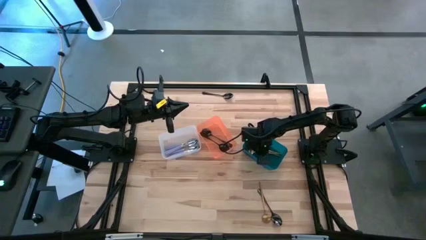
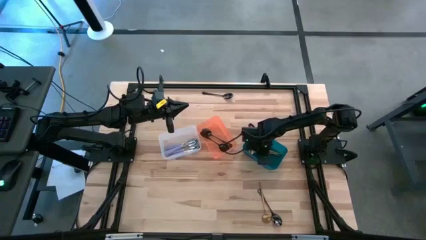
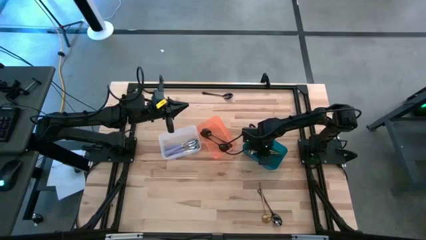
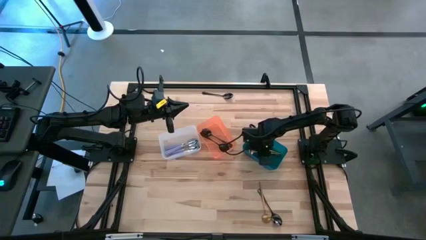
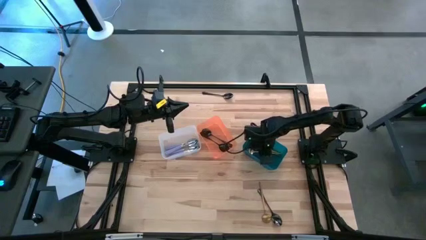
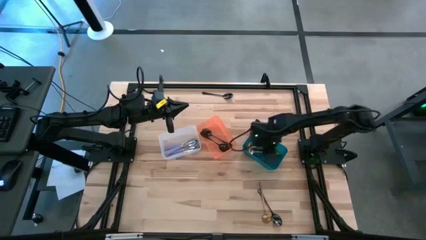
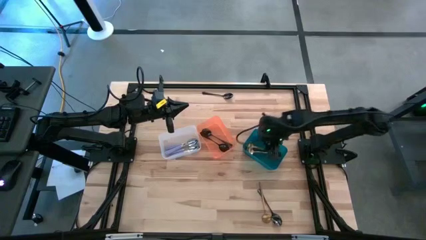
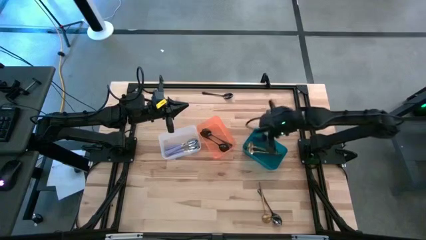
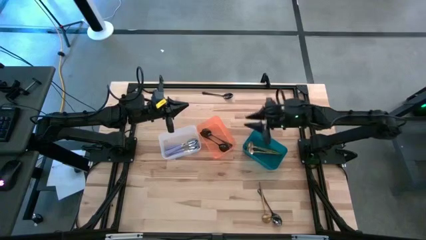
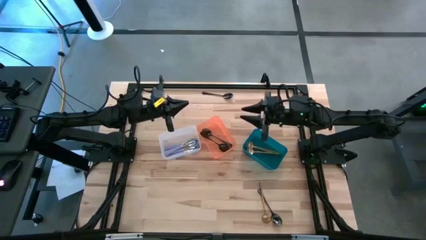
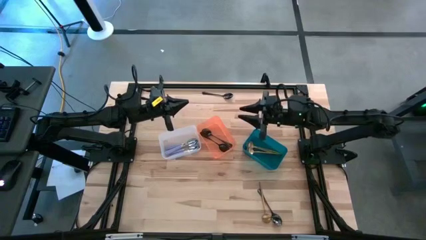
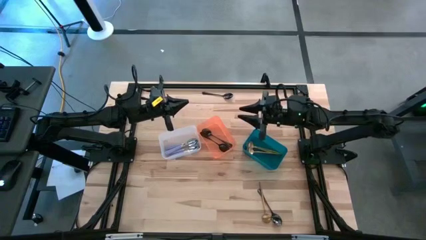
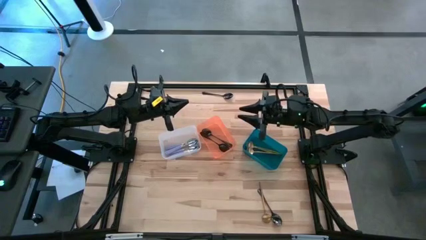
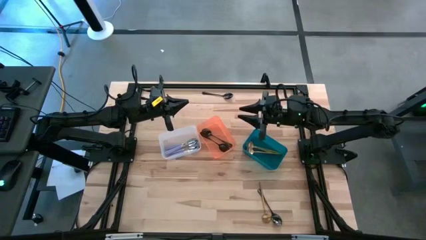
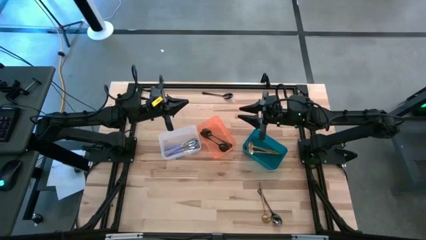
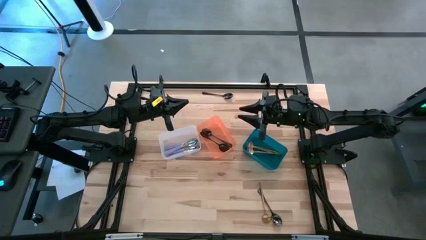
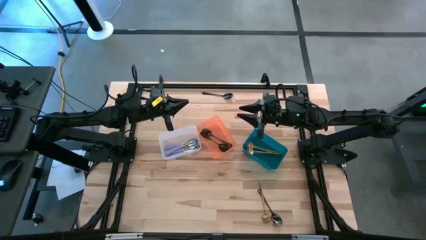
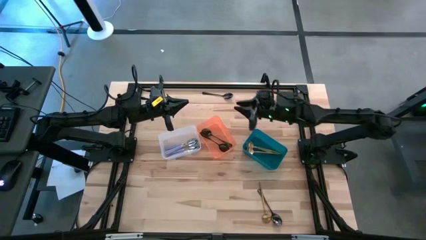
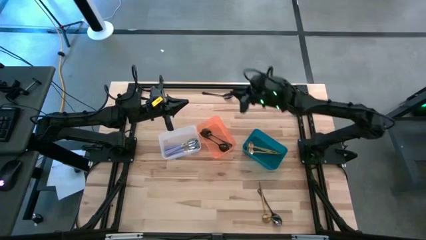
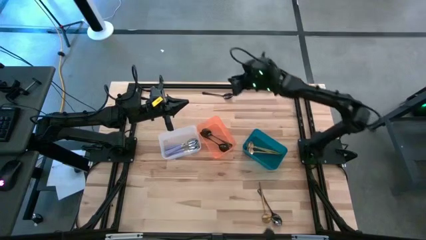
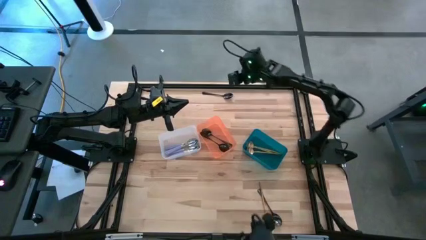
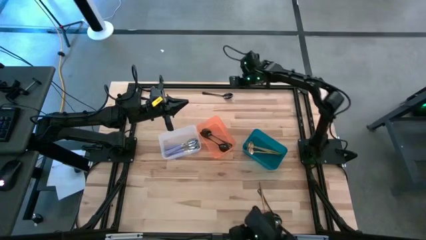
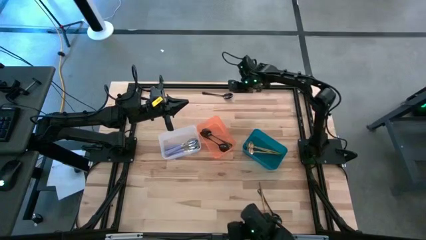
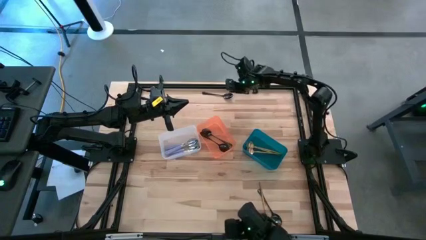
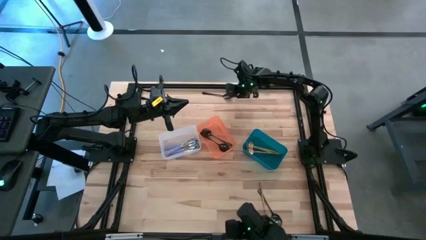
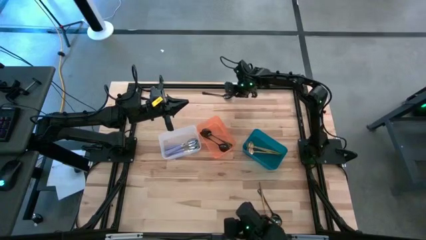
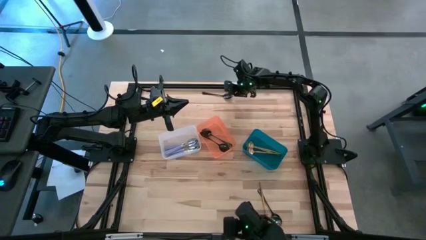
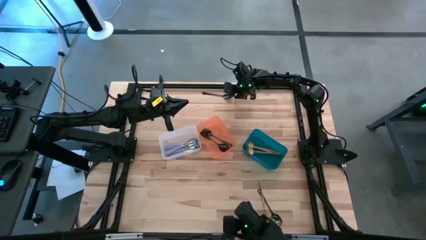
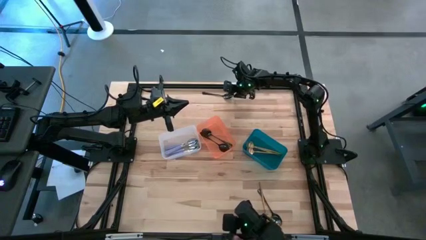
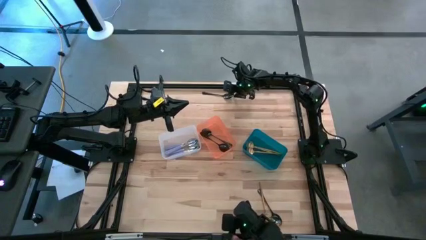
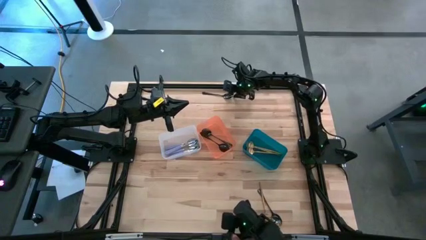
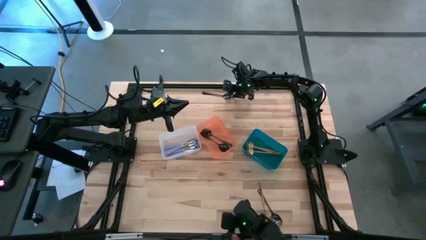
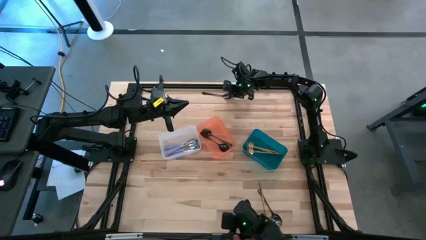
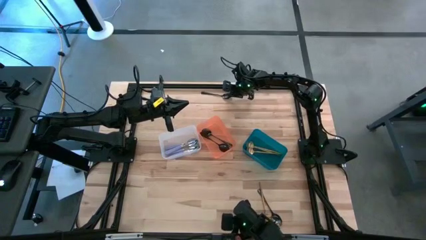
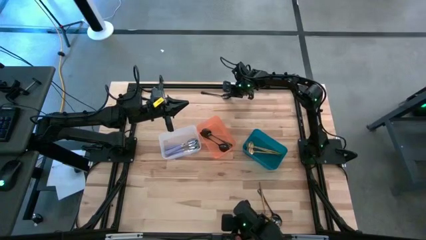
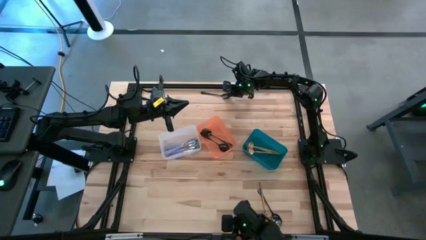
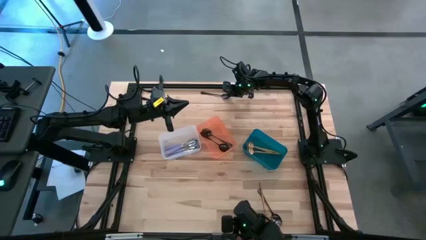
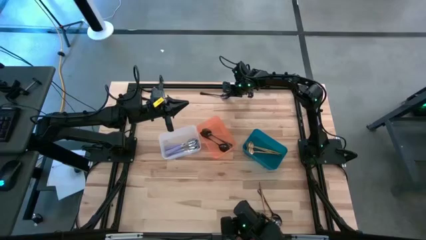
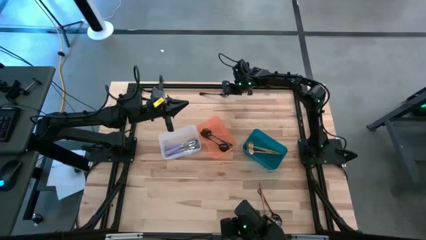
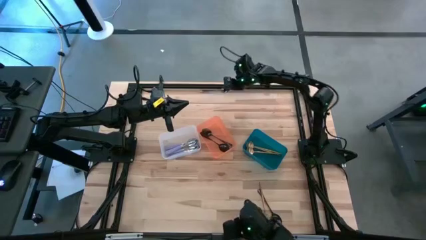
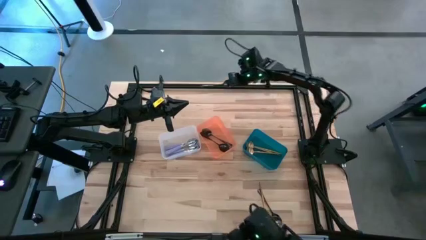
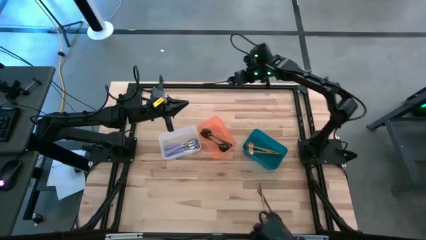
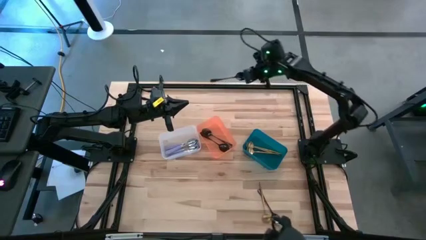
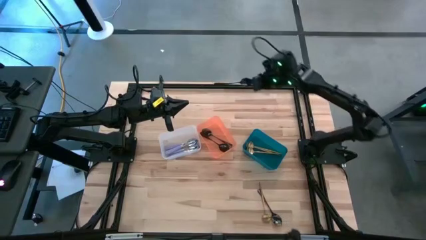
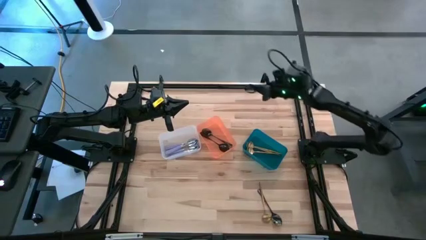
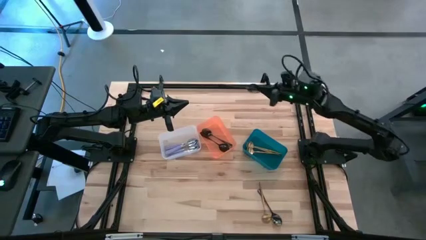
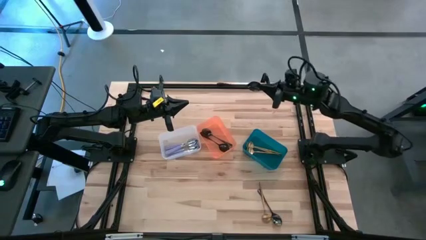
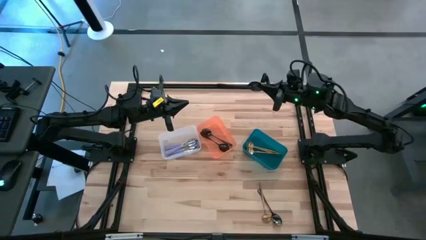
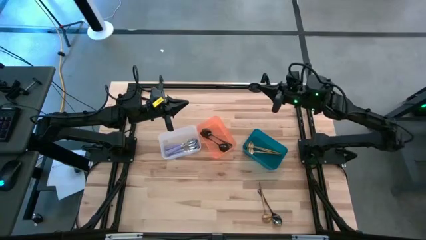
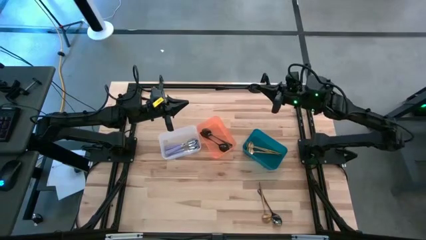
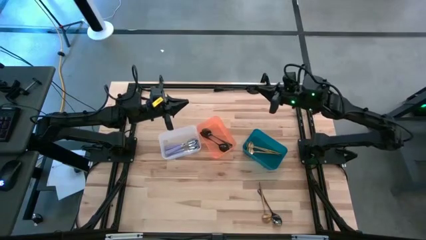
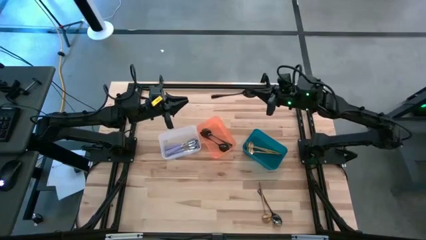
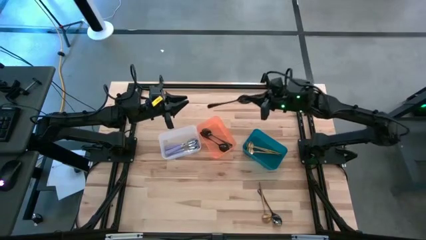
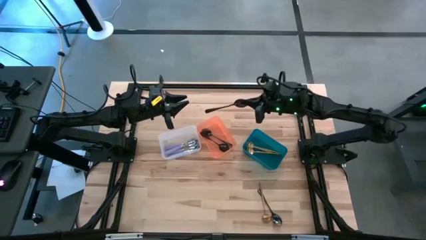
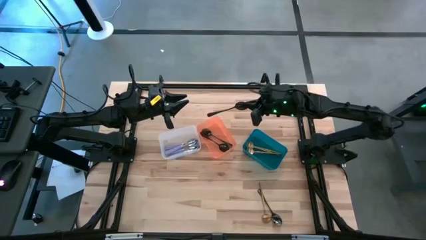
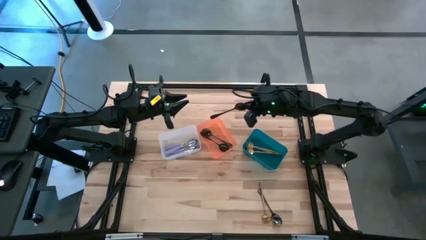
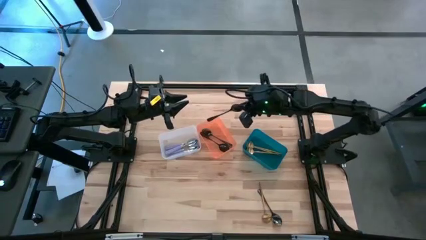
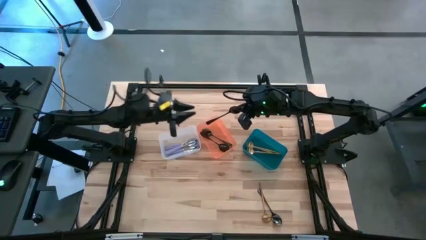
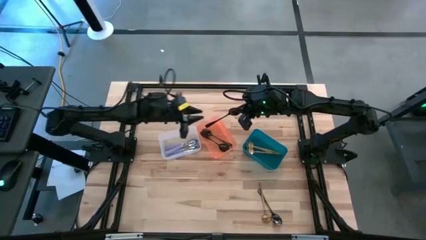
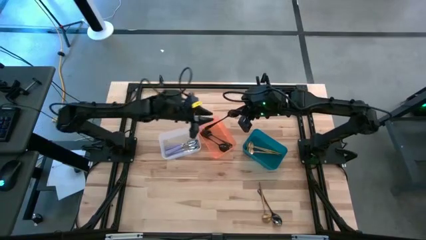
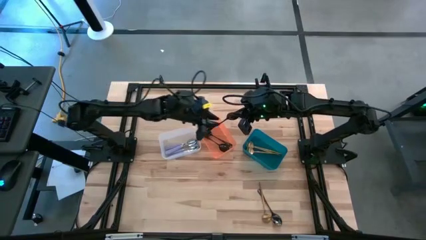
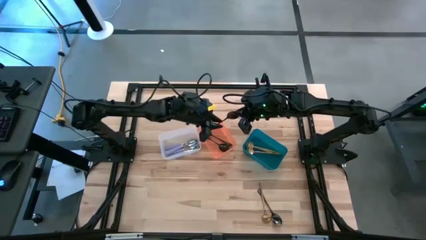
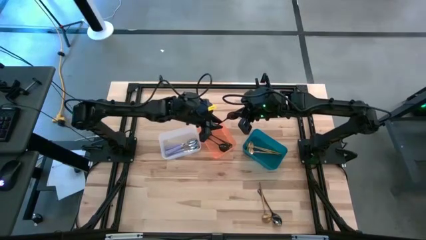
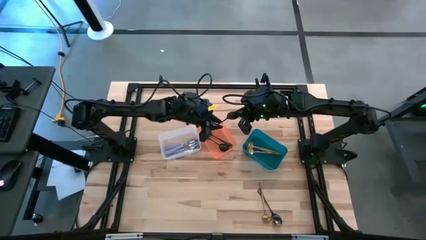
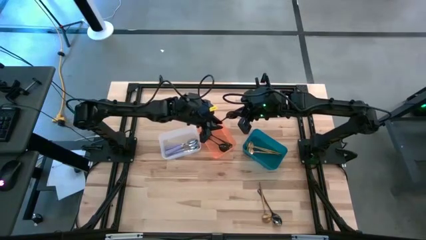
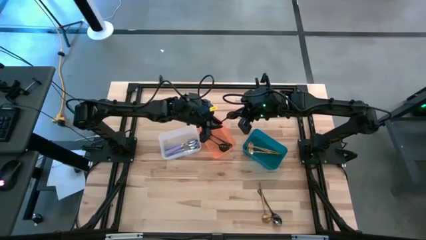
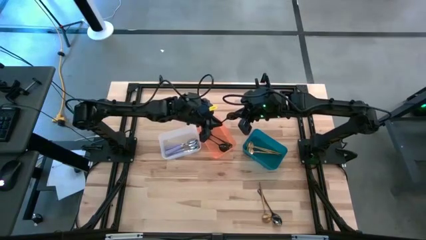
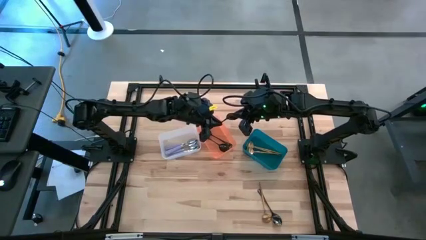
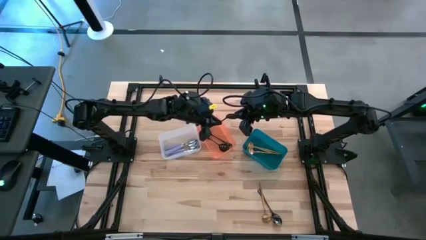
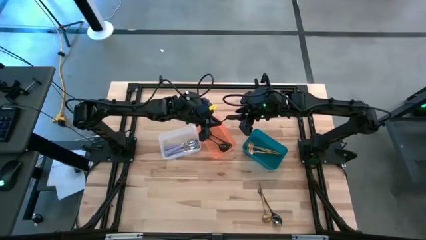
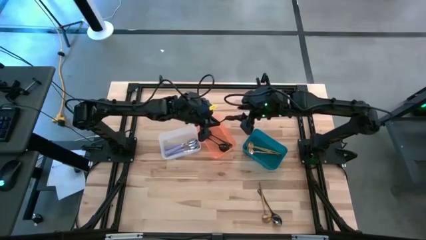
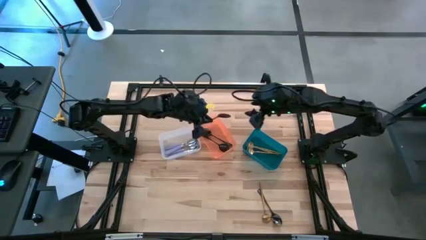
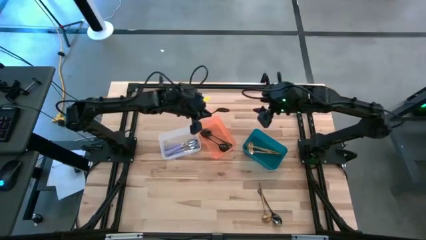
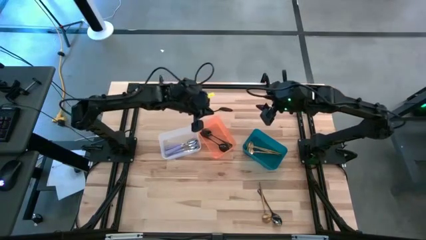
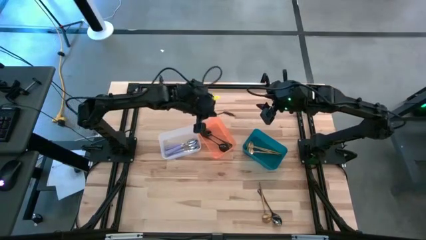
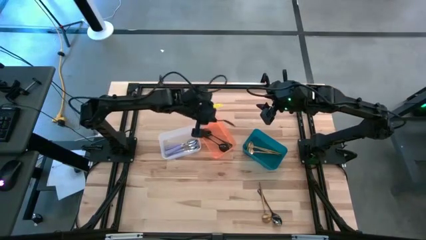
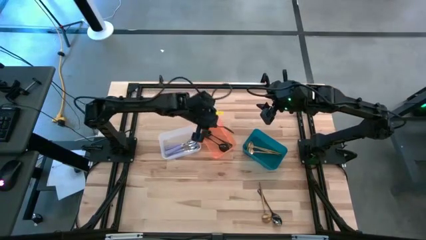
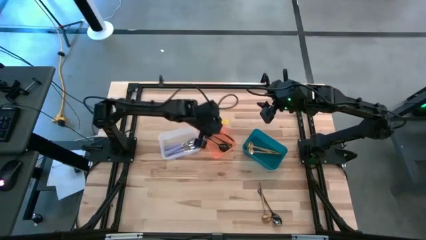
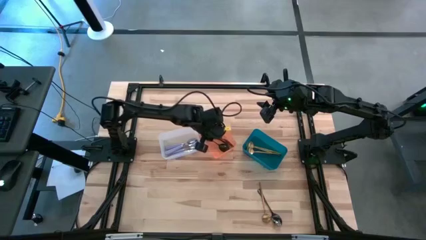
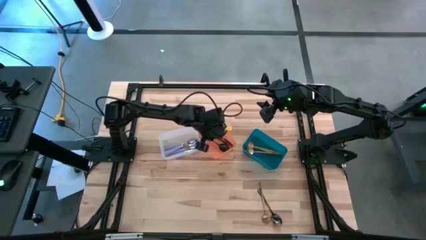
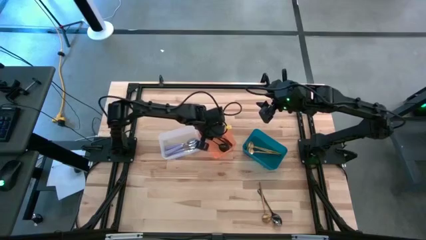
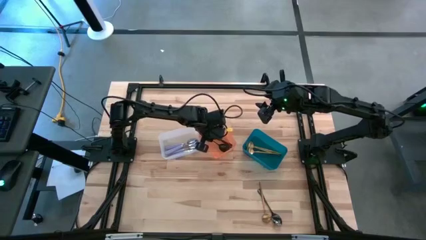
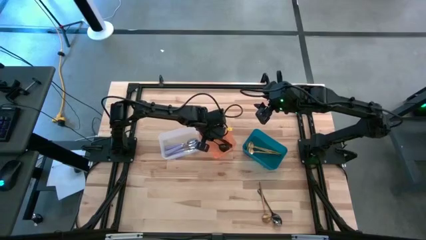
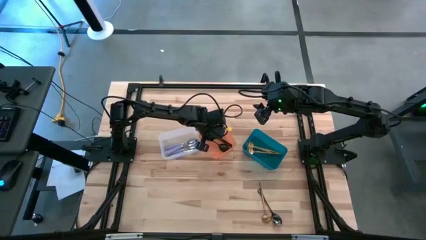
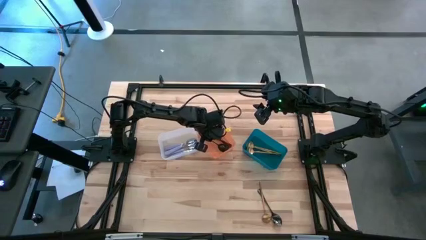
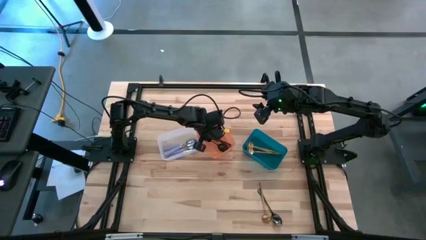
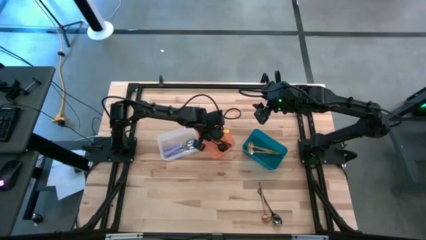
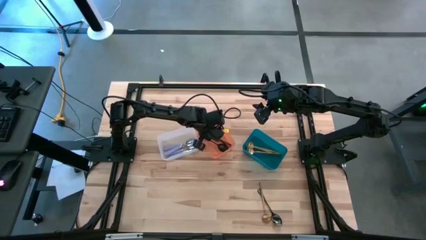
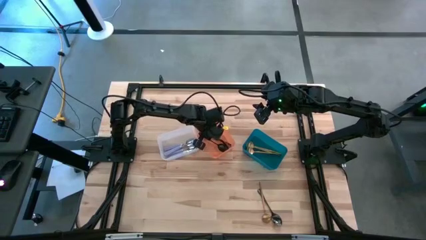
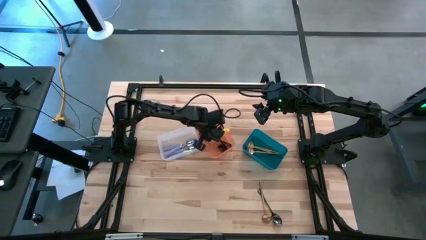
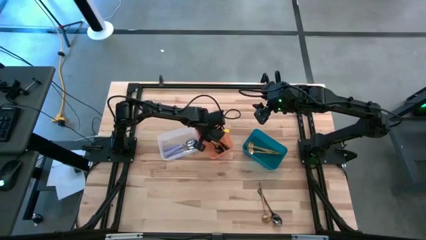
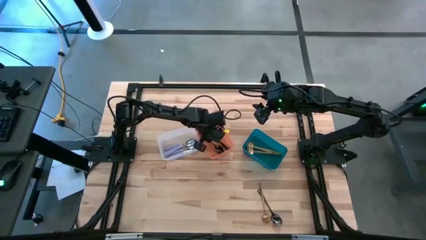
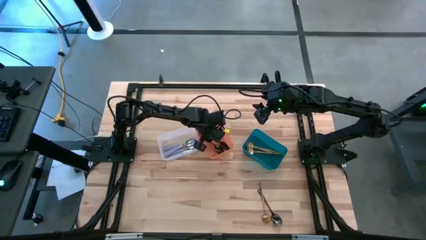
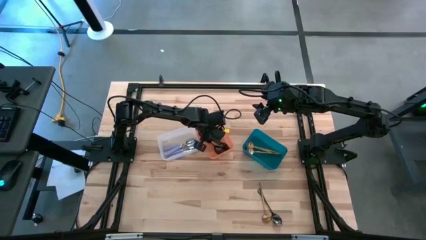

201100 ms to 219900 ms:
Task: Sort silverware by color (type)
Put the black spoon into the orange bin
